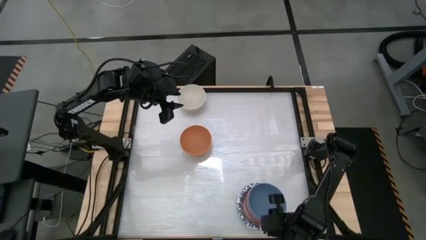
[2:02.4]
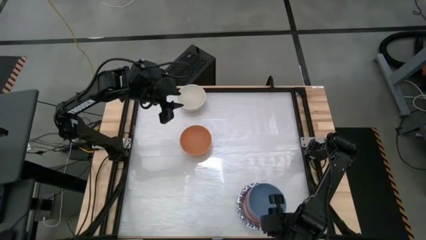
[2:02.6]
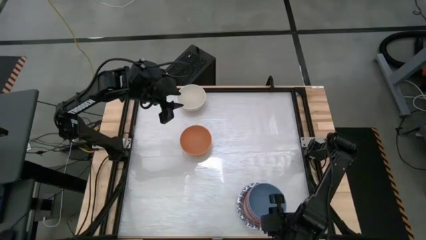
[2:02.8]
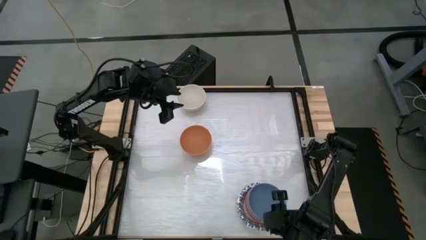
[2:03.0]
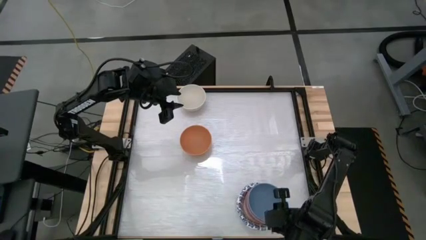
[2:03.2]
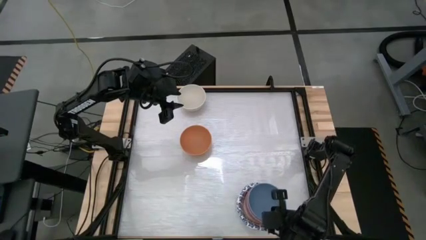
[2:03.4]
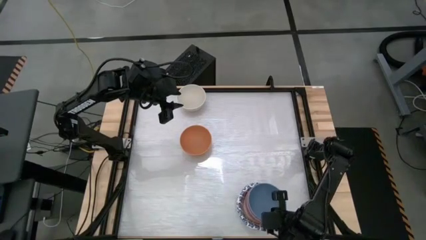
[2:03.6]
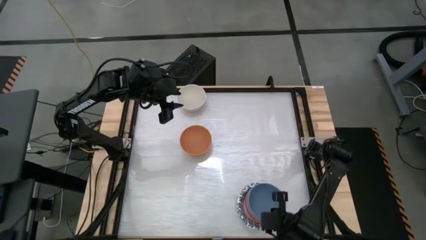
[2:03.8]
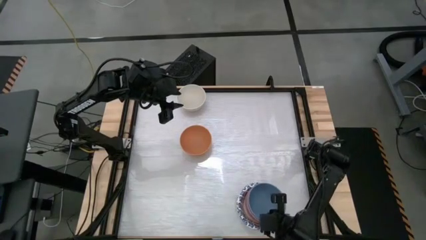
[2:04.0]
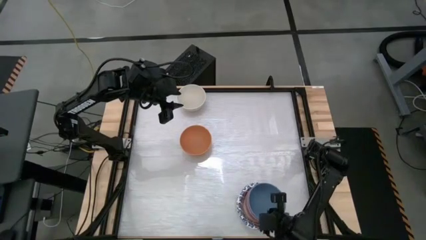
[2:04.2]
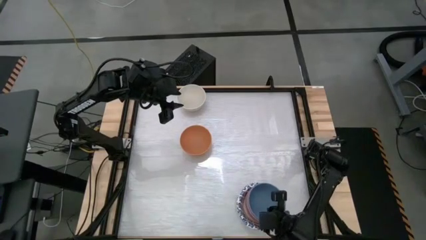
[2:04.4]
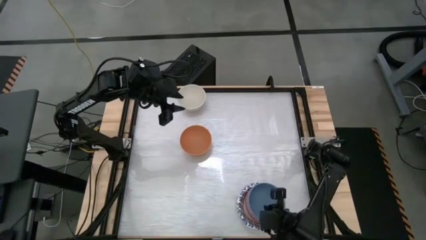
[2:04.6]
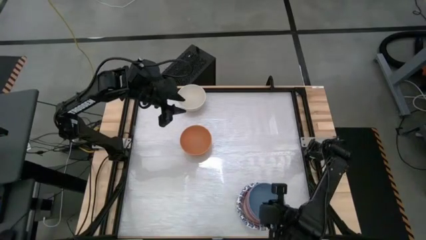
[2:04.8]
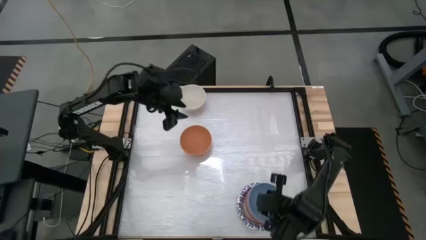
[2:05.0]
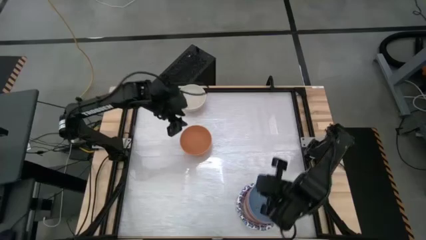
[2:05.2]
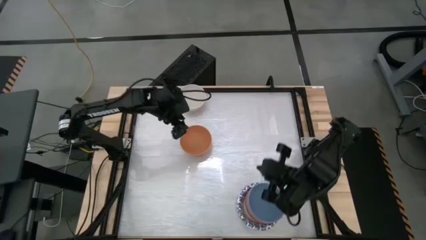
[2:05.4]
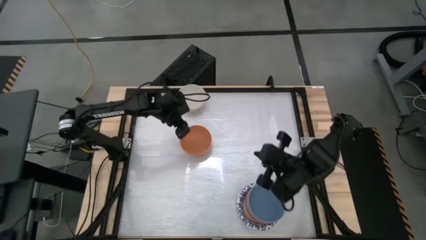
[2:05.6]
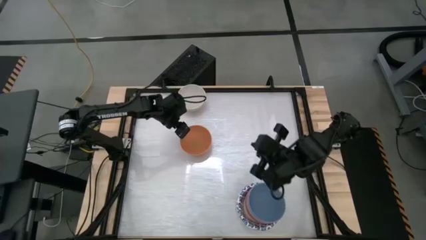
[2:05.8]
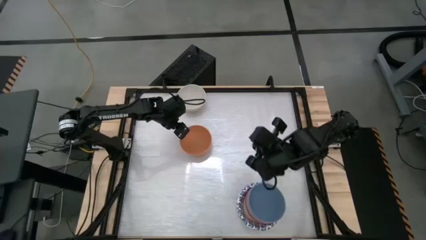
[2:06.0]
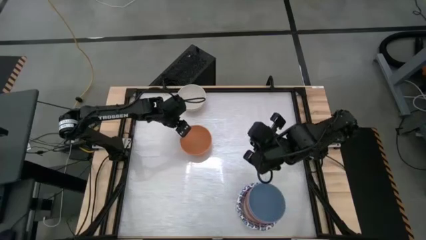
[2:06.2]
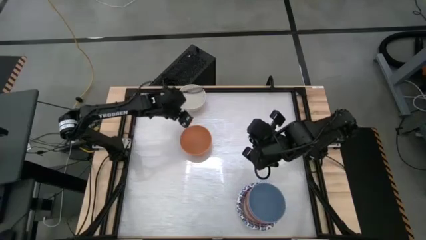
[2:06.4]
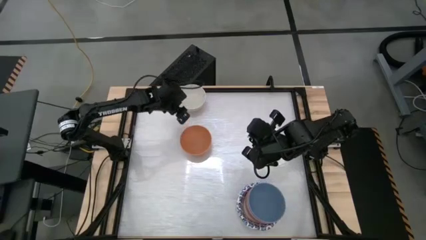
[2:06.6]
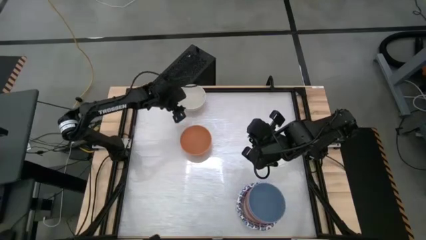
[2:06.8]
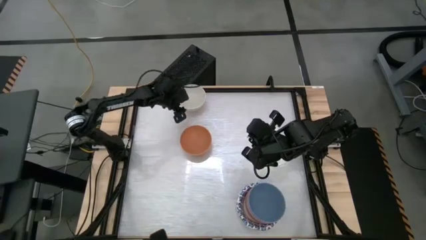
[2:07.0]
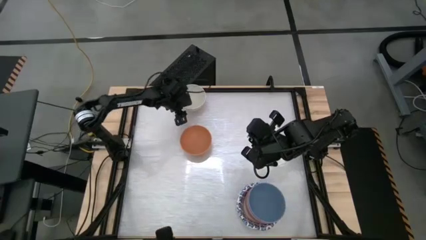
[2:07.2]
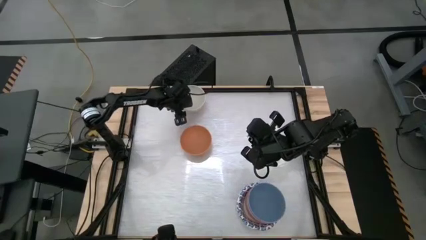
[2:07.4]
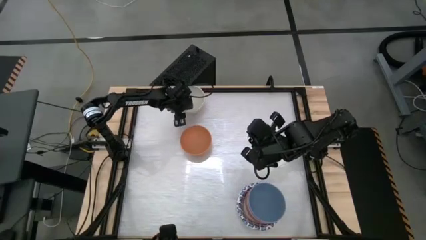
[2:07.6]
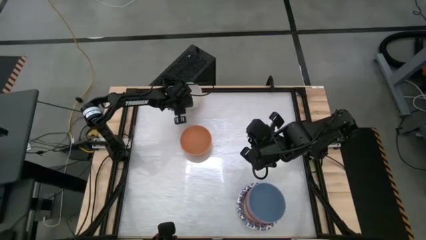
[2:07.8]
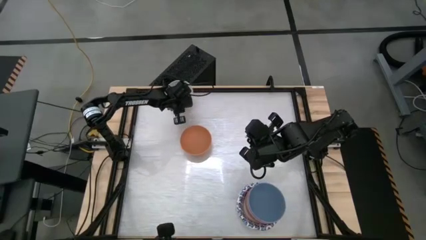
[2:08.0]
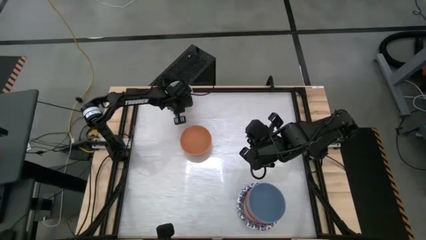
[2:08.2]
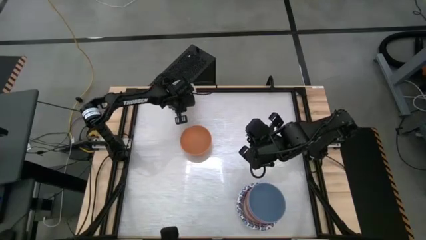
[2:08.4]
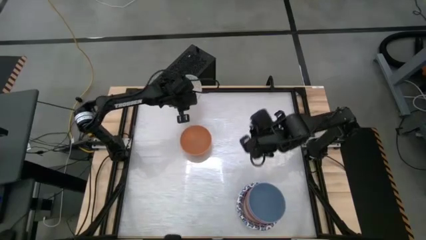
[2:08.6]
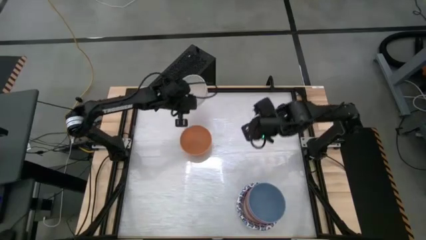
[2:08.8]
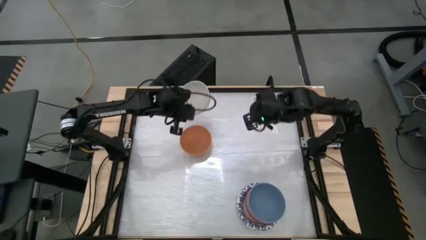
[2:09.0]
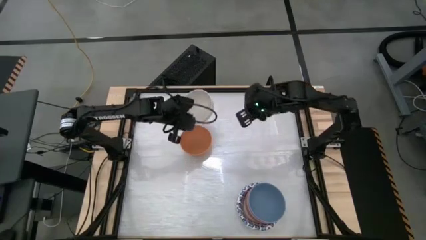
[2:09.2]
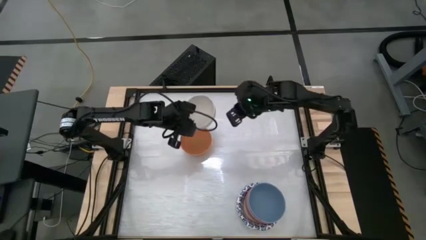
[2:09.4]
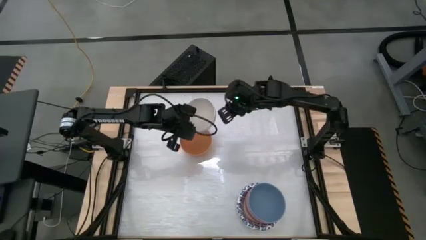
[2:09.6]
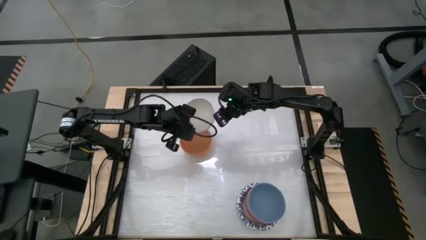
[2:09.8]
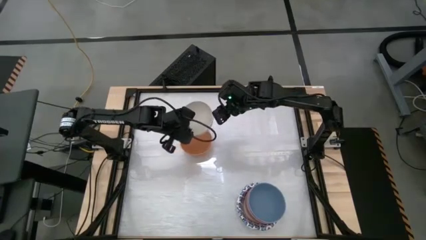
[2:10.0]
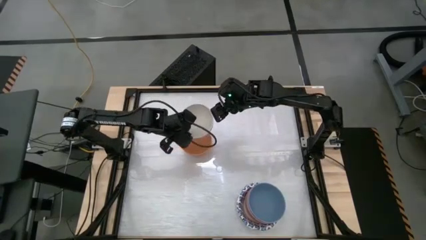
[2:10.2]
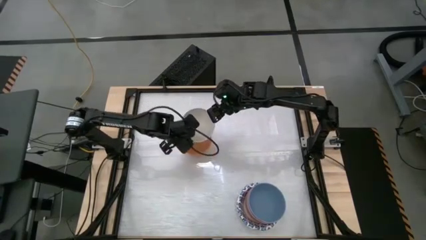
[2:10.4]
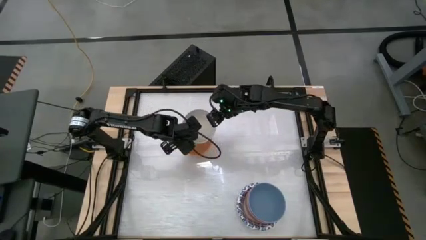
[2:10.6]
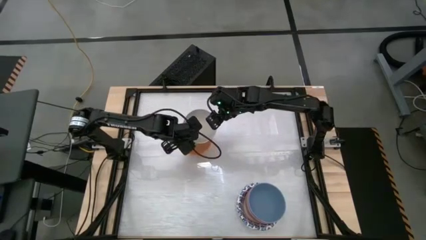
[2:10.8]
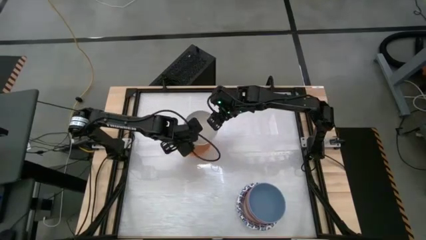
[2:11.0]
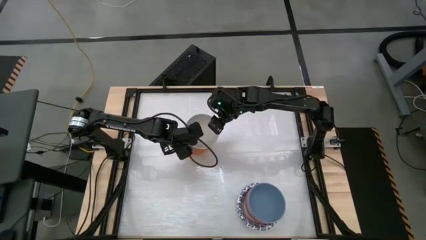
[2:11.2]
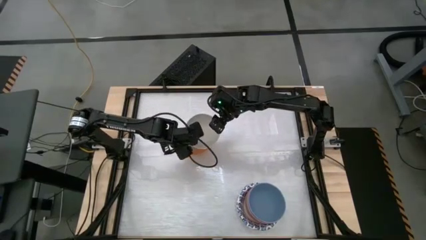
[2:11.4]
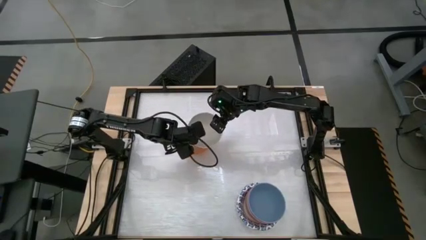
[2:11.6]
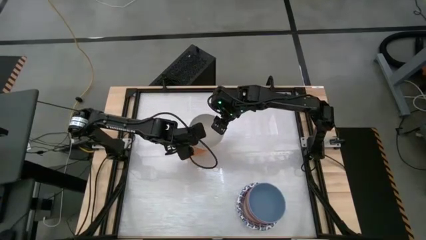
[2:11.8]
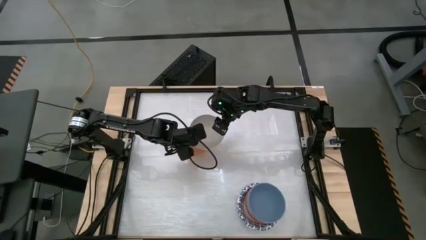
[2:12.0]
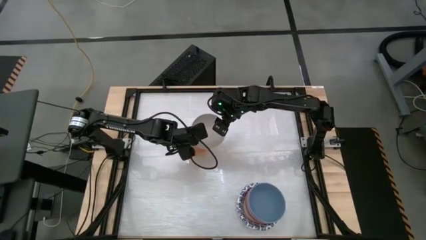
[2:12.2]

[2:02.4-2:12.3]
Stack the white bowl on top of the other blue bowl

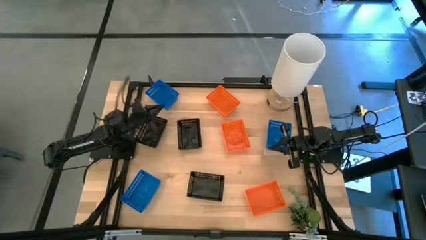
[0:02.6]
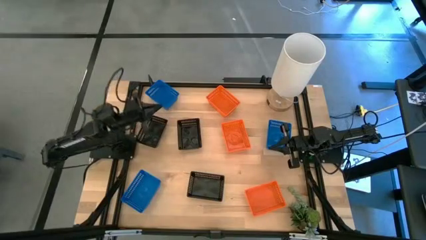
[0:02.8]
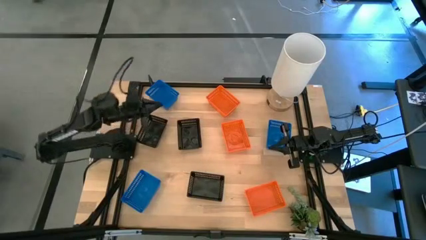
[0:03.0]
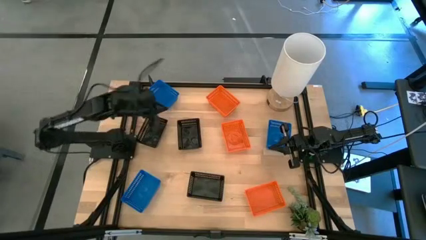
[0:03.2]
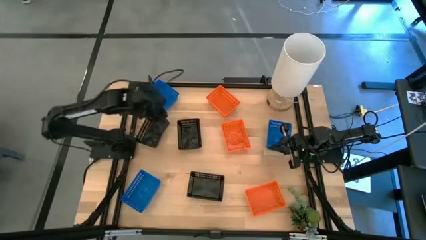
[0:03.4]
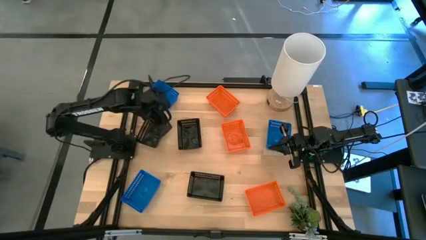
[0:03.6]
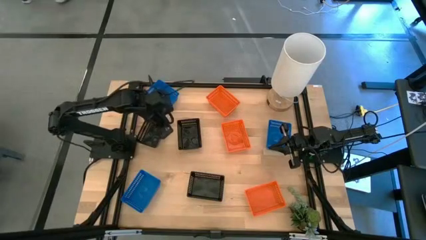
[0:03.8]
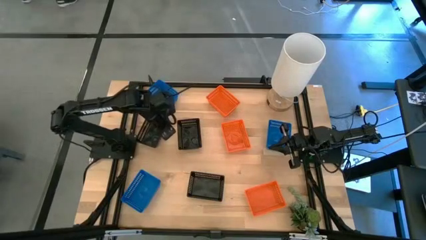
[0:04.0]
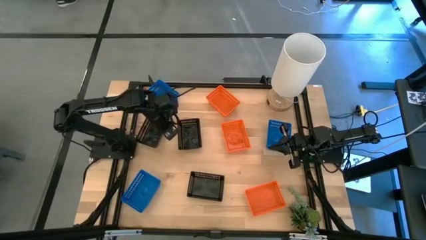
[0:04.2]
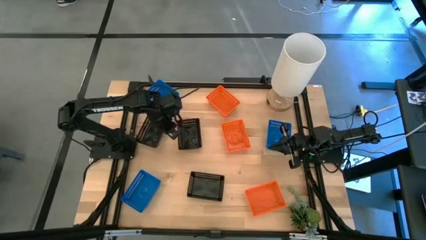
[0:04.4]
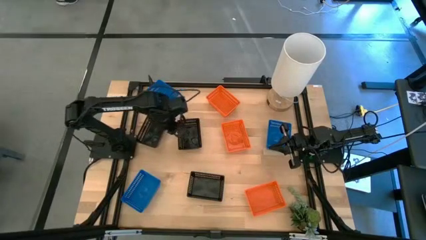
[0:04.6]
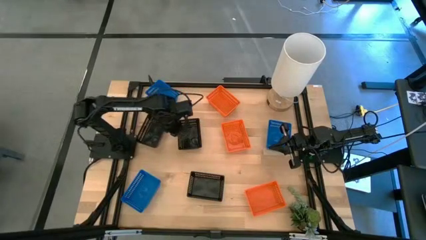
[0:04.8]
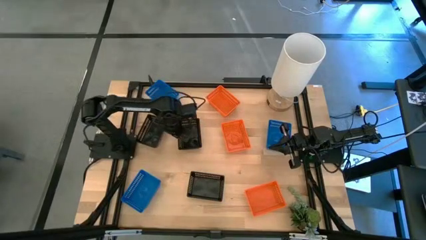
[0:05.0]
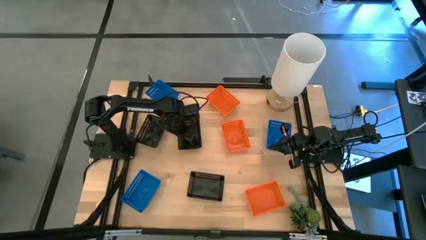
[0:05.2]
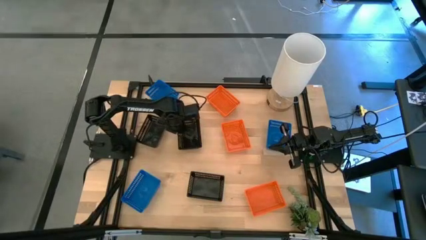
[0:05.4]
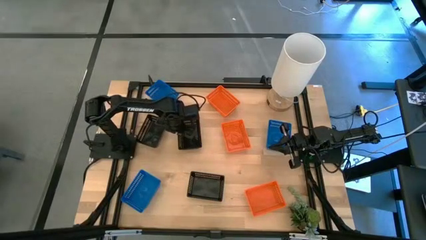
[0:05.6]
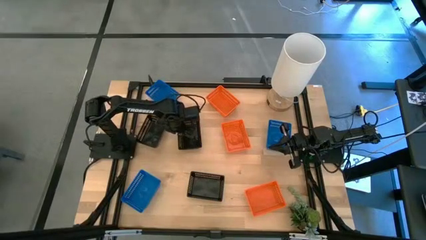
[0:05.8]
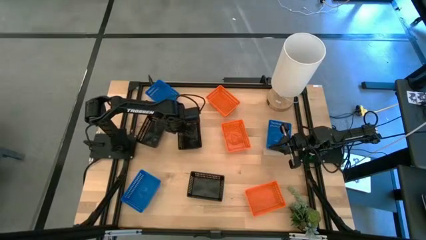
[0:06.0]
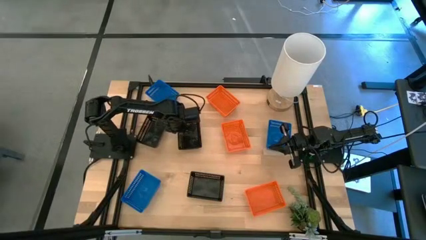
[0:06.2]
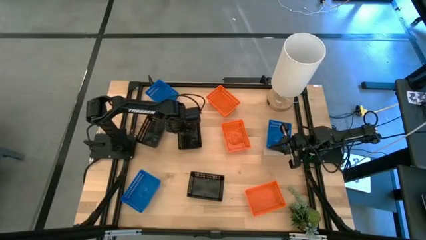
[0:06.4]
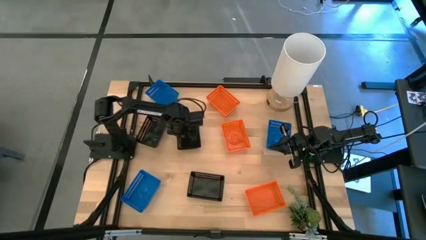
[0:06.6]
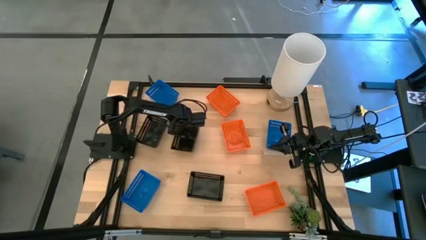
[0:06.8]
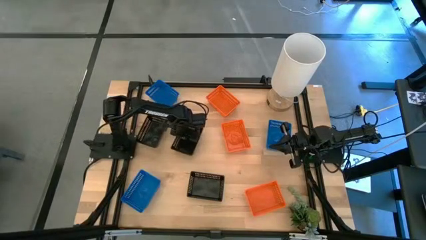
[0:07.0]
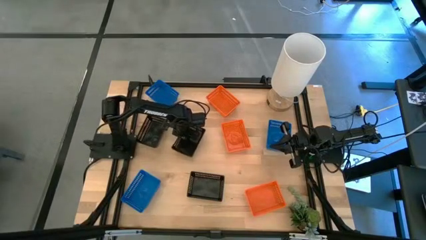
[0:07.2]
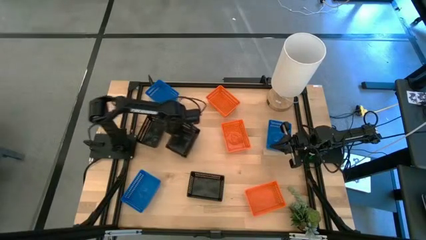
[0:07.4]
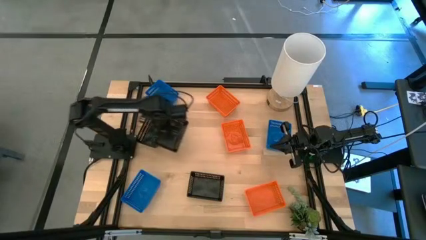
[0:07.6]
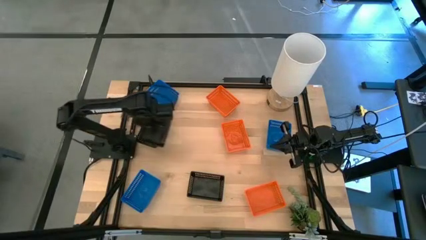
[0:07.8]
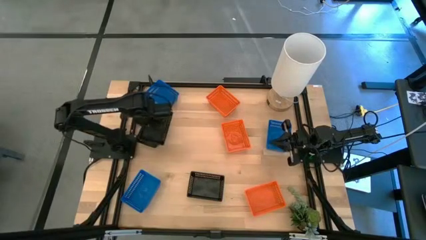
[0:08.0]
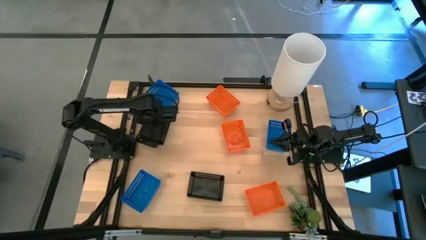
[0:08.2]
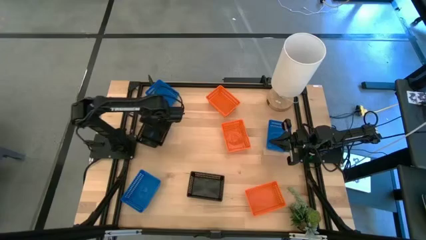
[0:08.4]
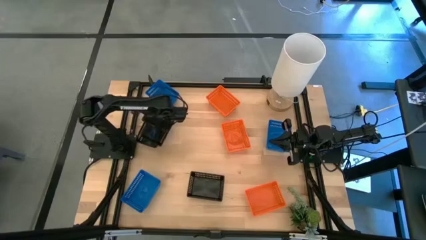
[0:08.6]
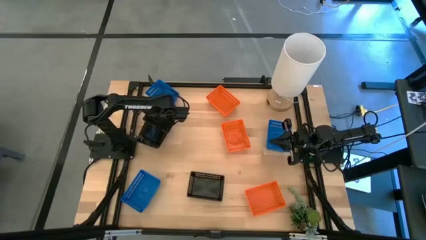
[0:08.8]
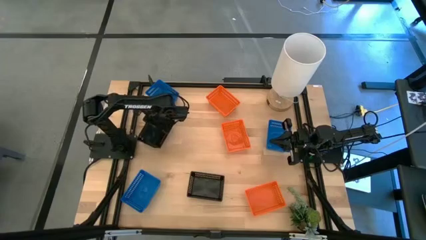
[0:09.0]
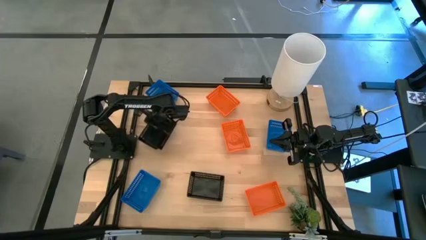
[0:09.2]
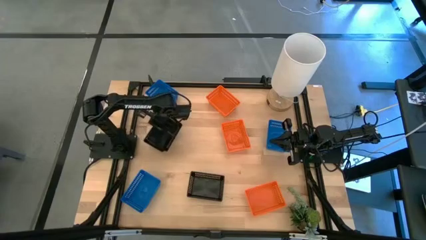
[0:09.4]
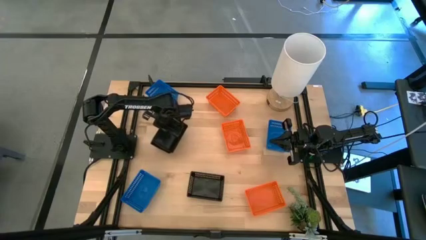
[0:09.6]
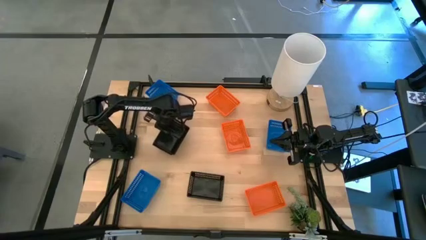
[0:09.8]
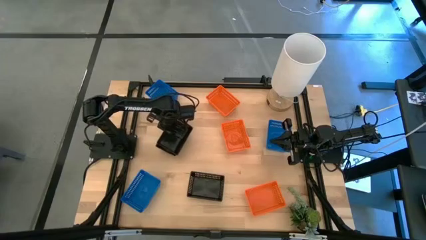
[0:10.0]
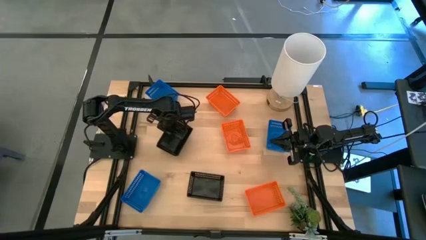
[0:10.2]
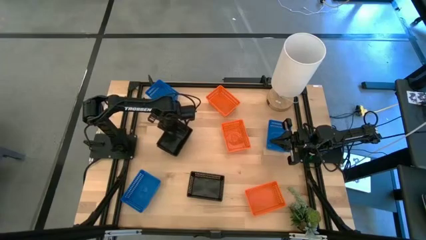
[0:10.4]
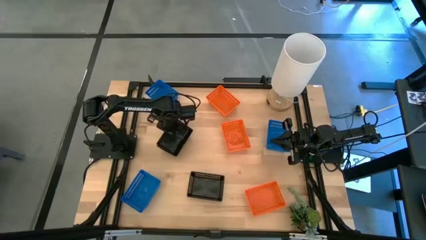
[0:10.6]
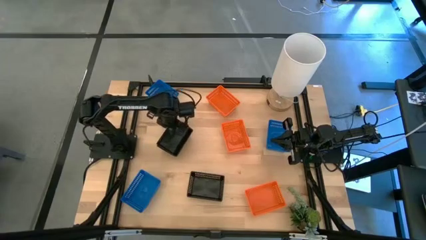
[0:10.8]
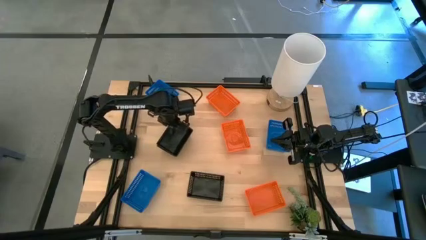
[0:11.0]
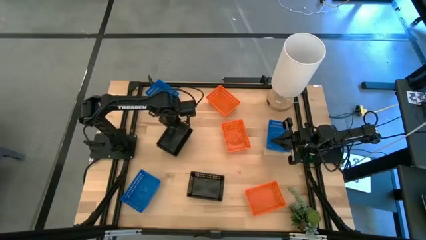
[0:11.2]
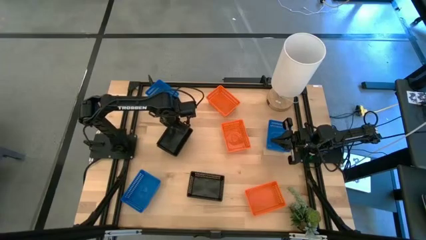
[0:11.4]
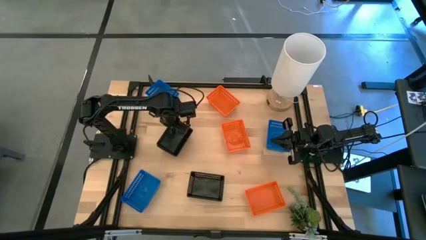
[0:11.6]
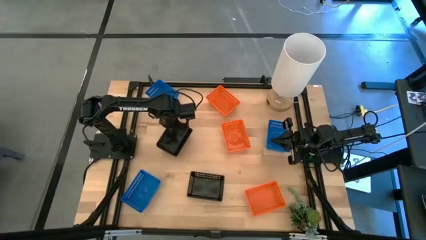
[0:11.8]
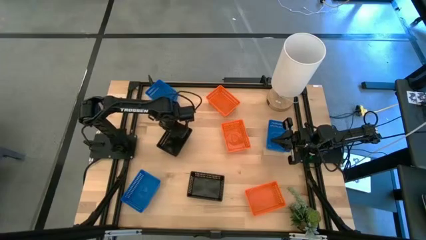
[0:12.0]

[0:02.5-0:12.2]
Stack the top right black bin on the top left black bin
